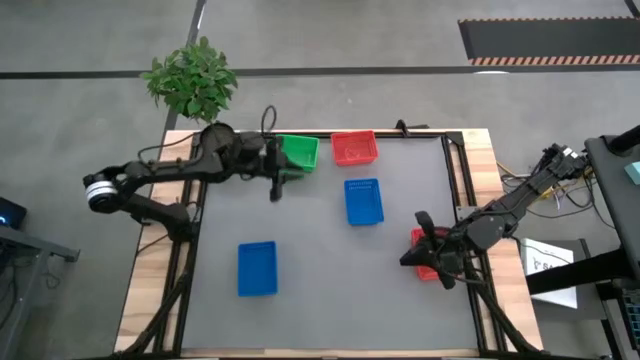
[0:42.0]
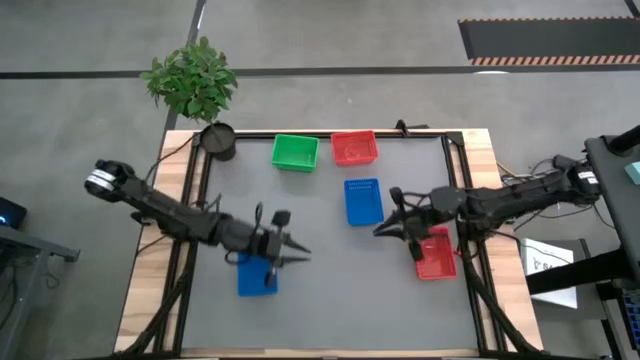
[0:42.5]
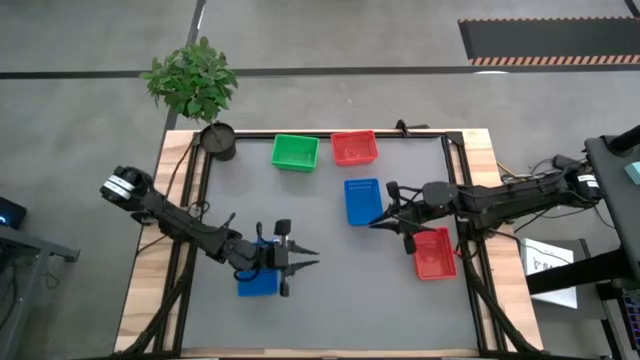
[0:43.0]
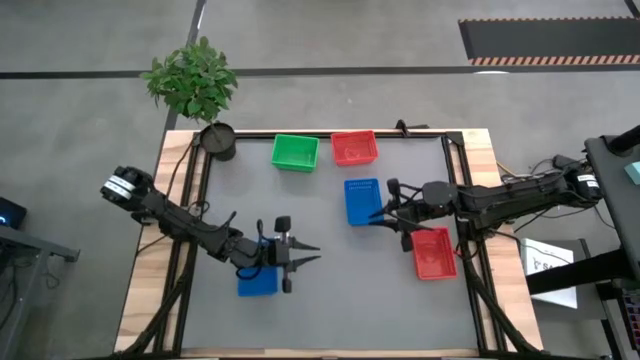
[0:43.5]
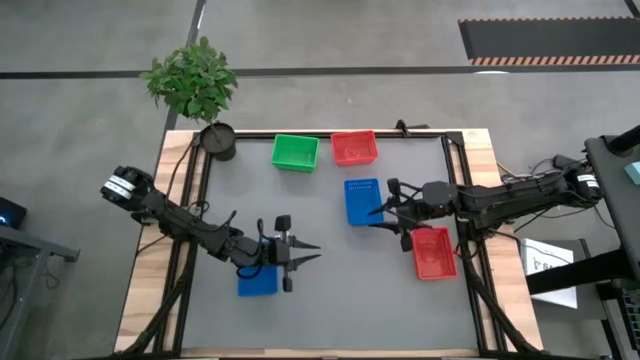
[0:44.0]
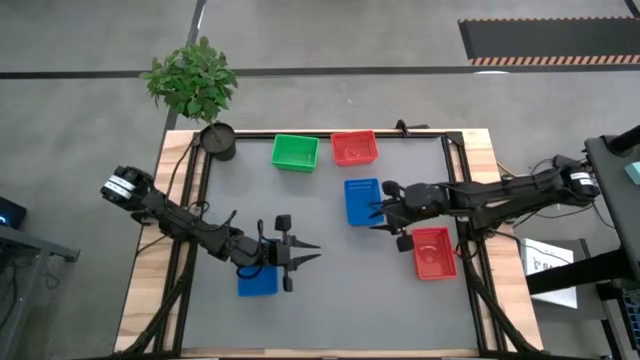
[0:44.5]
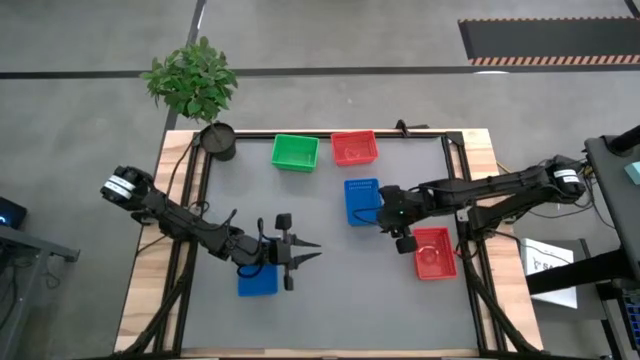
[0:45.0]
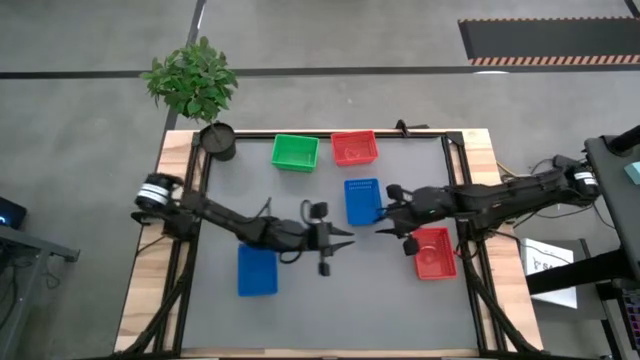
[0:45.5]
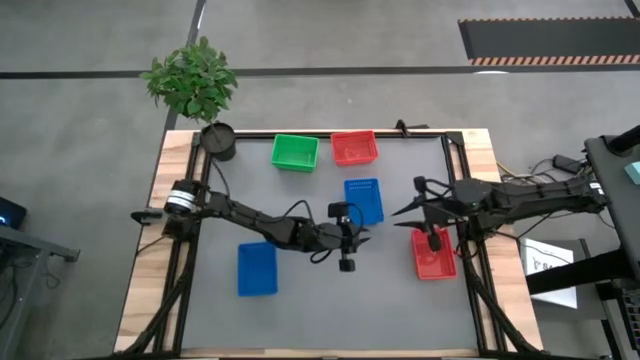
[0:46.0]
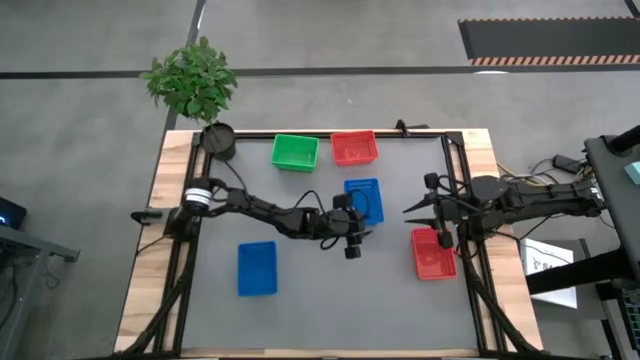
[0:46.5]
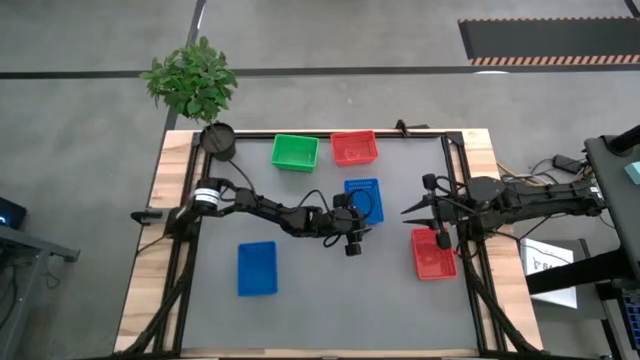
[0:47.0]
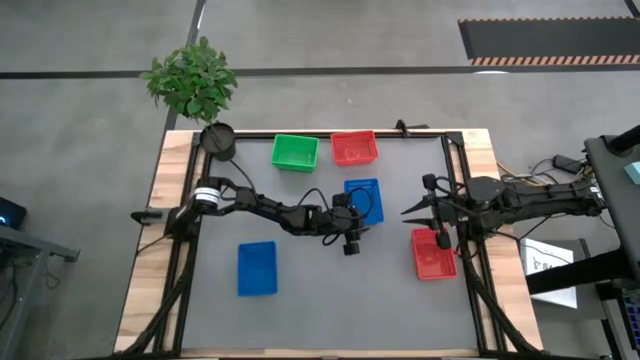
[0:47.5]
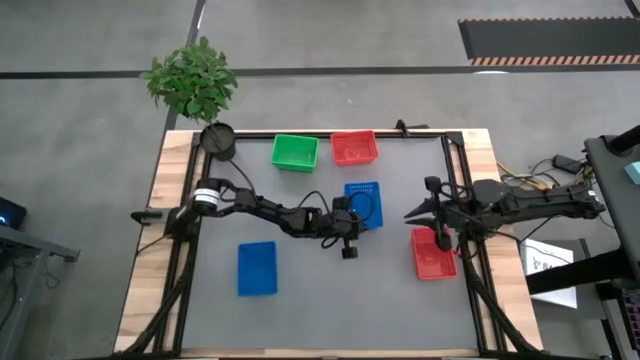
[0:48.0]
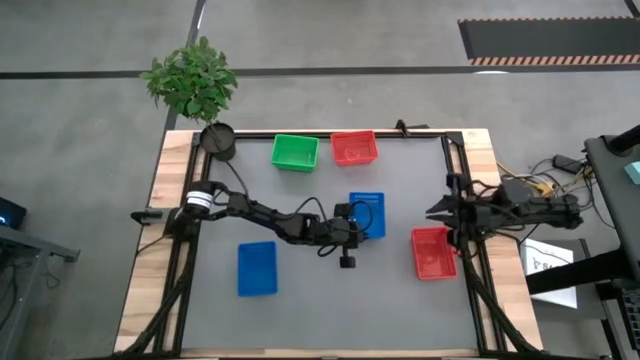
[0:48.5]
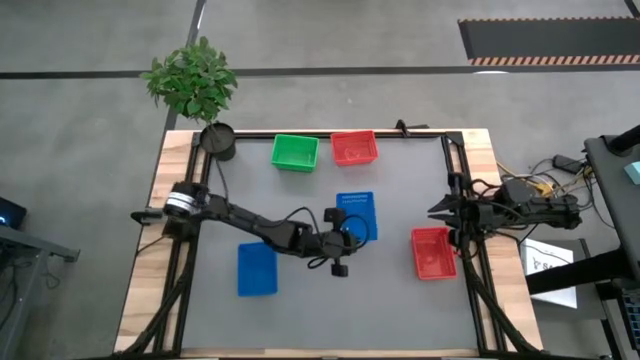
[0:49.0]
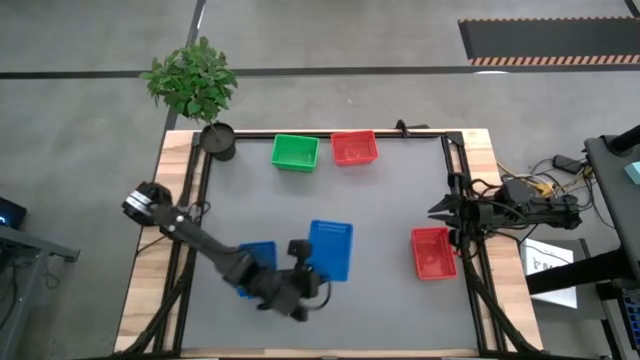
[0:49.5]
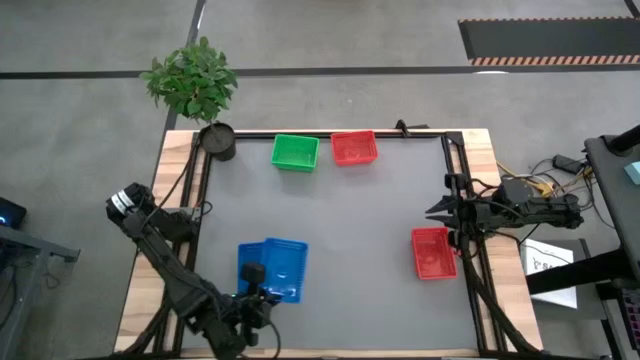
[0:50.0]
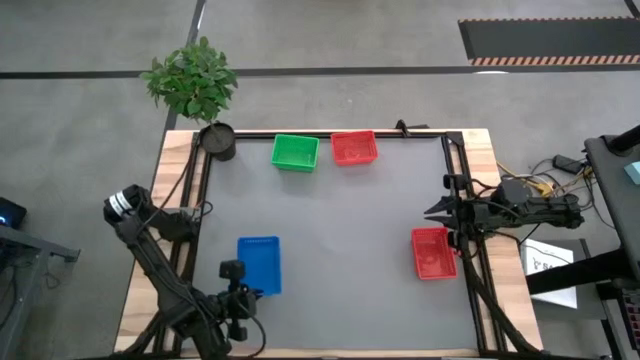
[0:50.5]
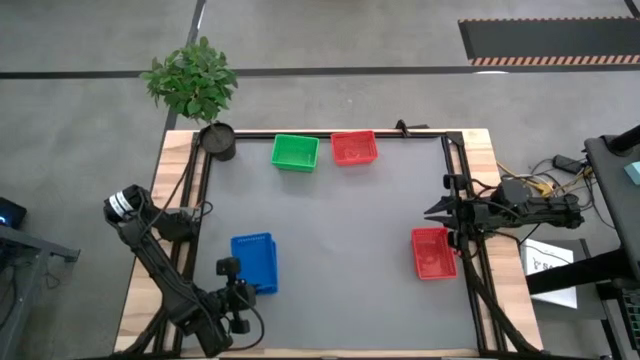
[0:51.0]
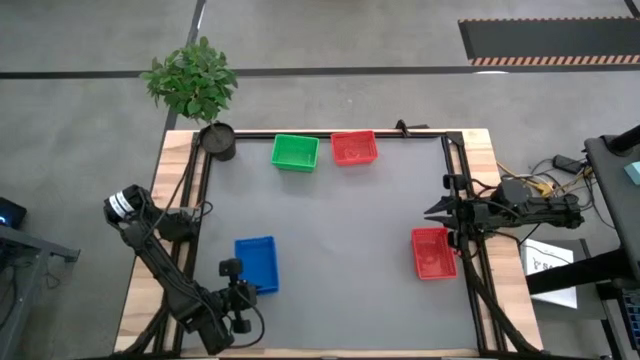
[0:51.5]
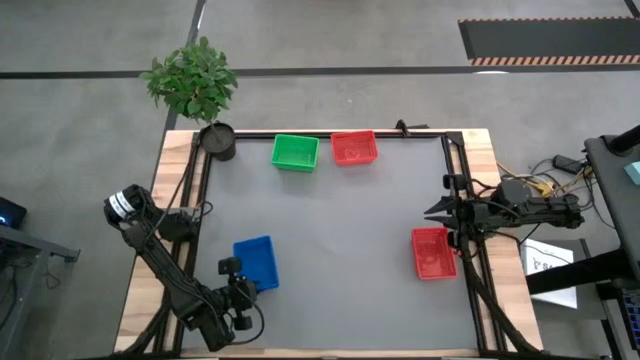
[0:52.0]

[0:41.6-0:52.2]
Stack the right blue bin on the blue bin

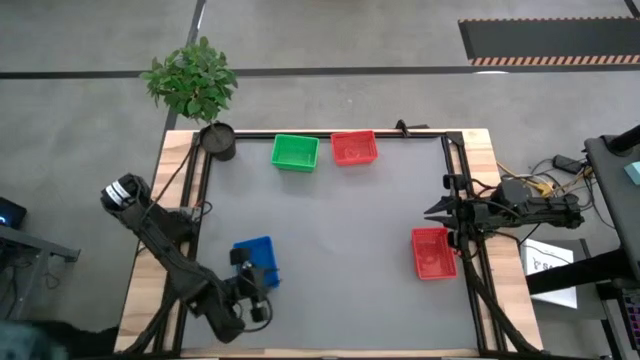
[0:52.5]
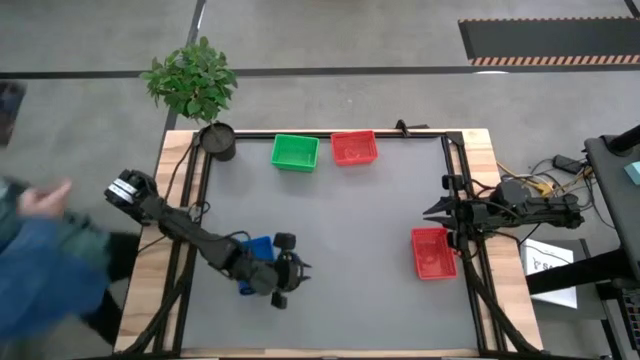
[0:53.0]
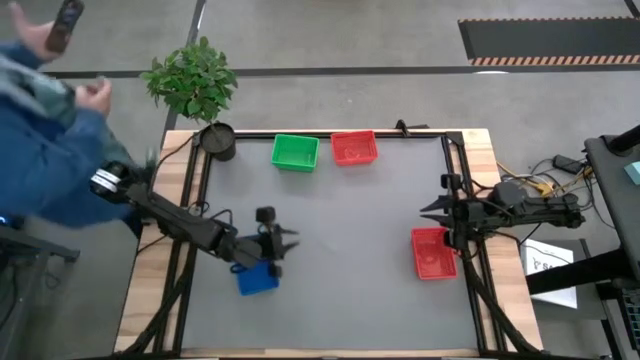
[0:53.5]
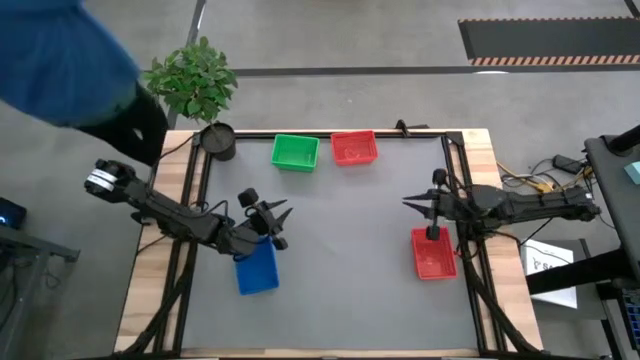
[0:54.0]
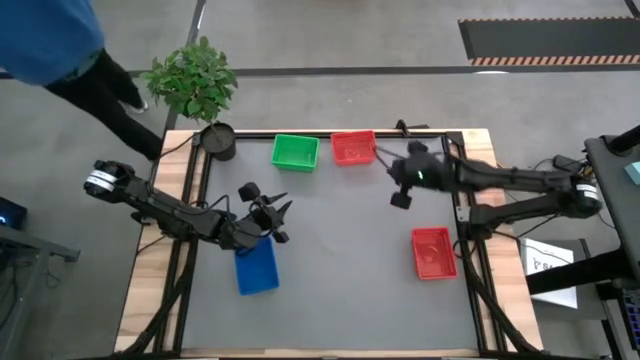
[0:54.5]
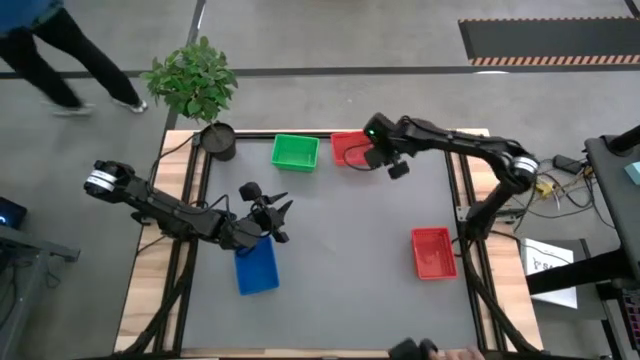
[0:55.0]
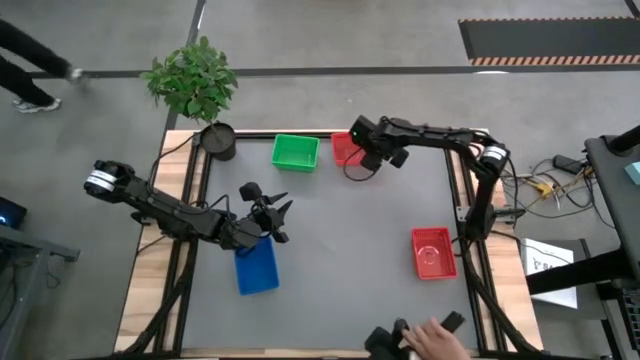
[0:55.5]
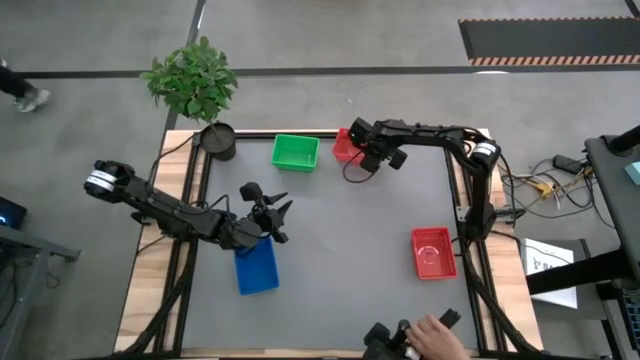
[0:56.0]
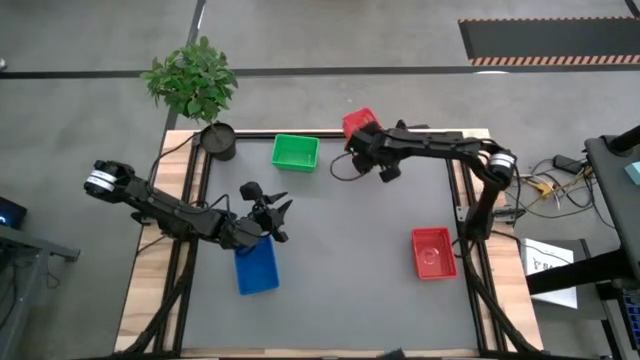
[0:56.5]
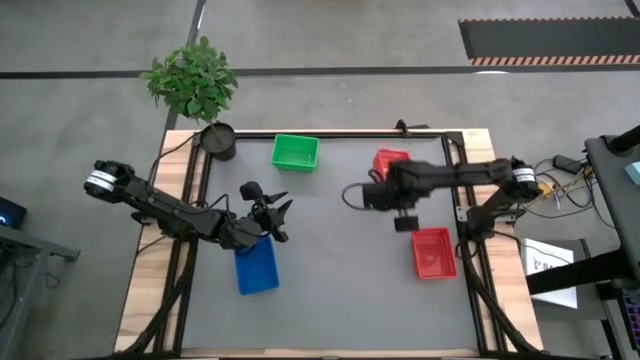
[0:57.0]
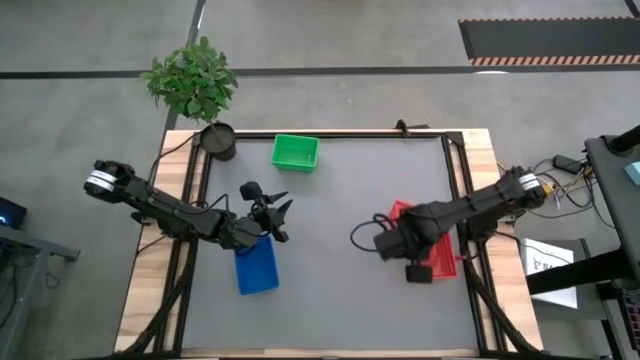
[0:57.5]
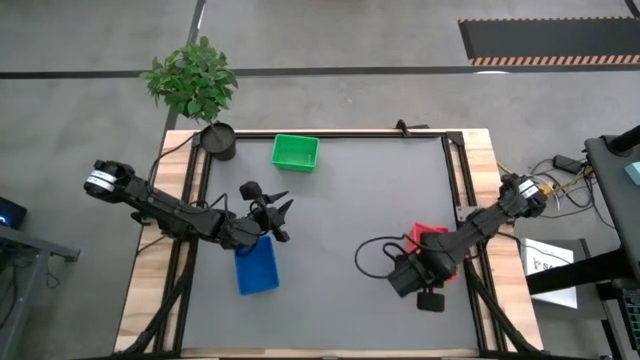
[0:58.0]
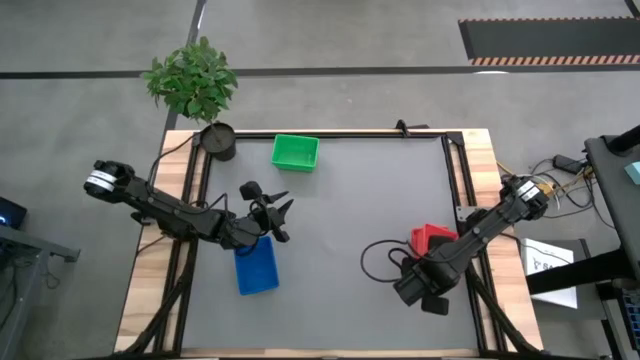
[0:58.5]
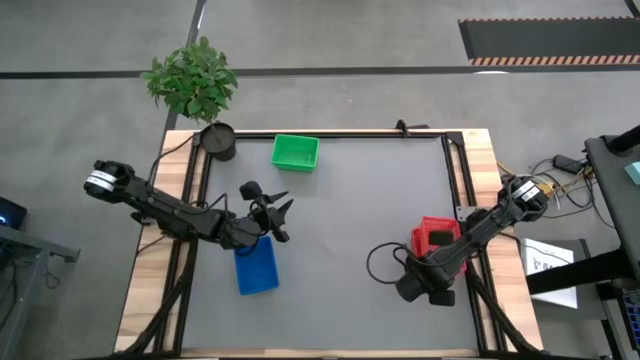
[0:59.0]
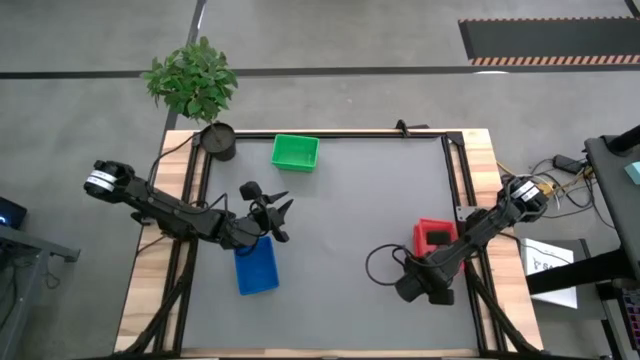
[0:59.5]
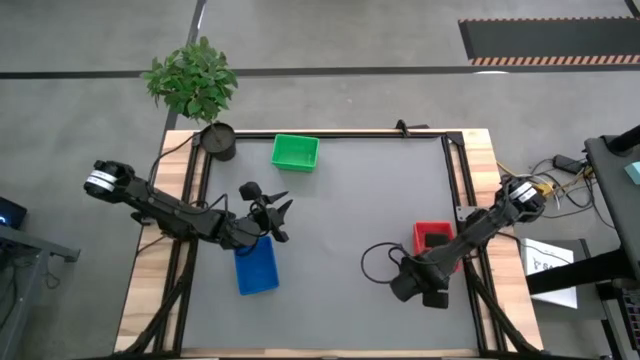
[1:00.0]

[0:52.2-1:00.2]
Stack the top red bin on the red bin
